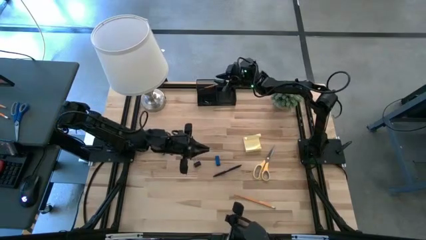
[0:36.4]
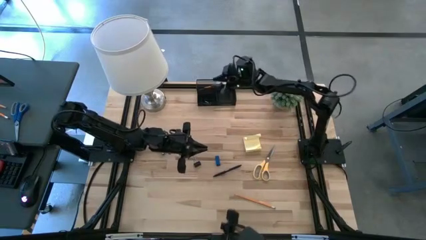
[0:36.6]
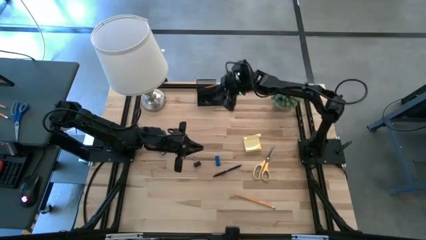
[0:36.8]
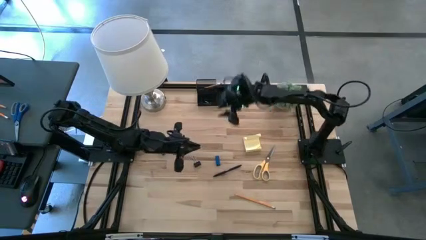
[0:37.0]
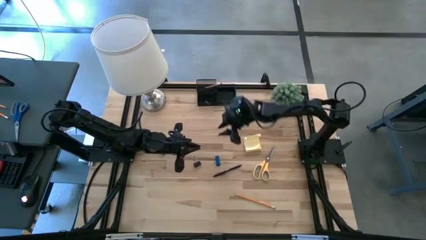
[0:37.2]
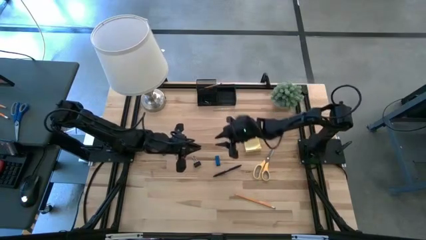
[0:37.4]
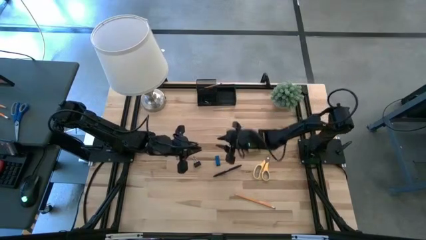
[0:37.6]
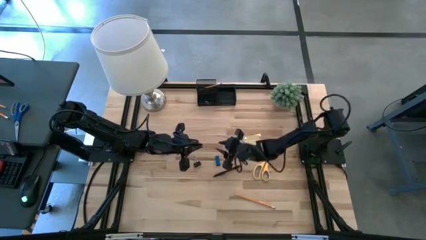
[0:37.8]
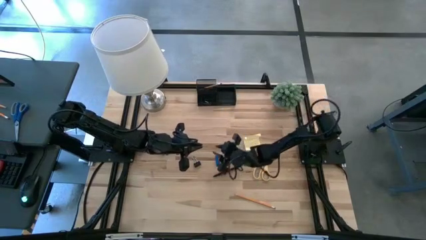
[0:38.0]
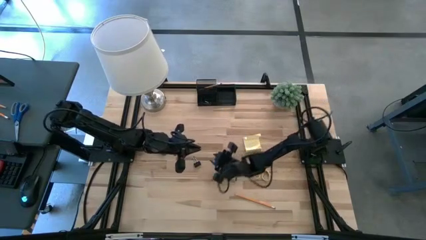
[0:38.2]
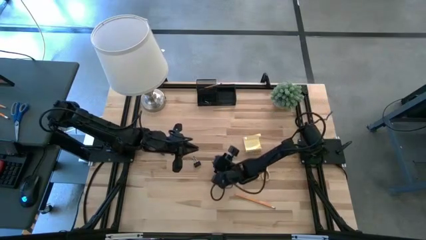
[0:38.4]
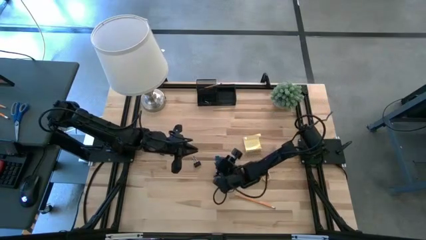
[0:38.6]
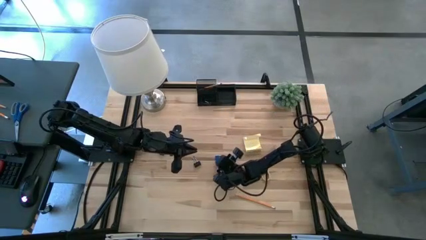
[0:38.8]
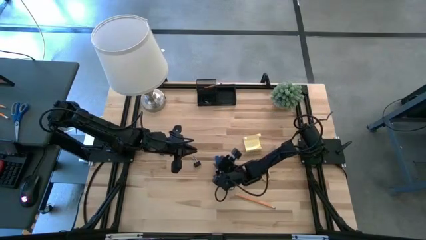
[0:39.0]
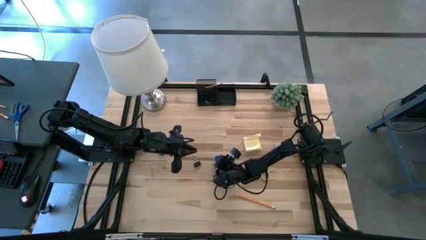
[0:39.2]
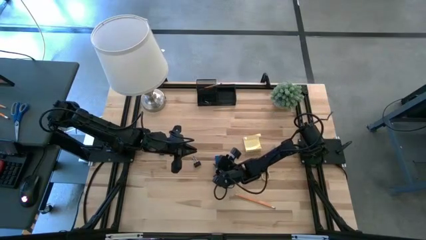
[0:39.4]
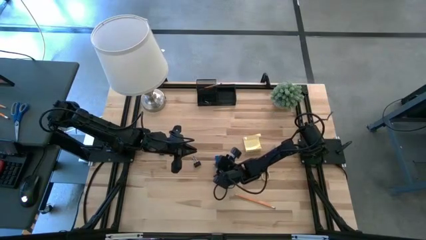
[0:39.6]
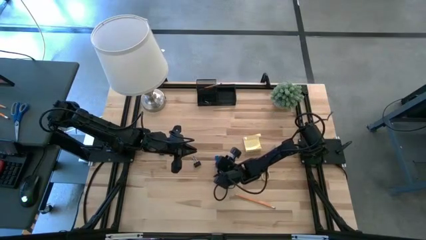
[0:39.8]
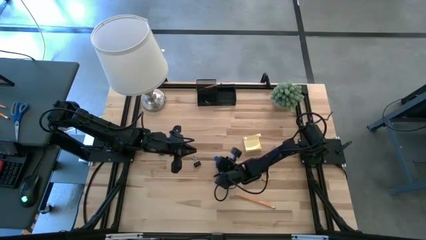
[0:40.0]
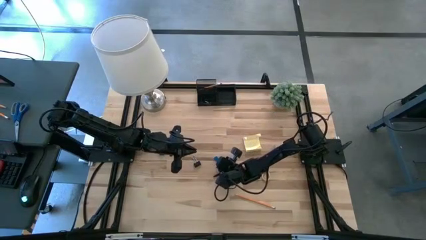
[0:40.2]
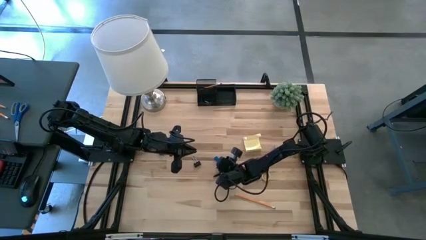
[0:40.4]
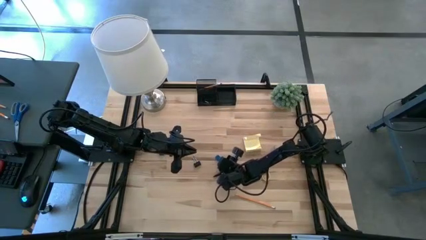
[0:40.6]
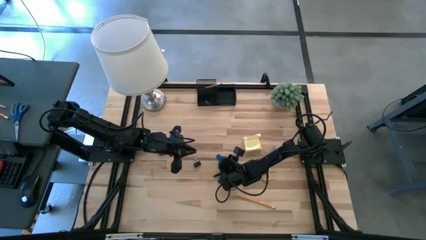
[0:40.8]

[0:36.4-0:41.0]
Task: Pick and place office supplies into organizer
Put the blue eraser into the black desk organizer

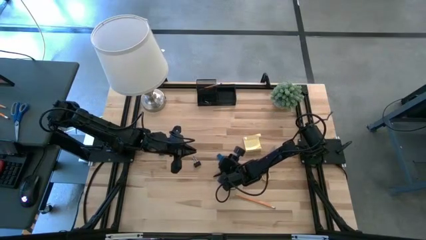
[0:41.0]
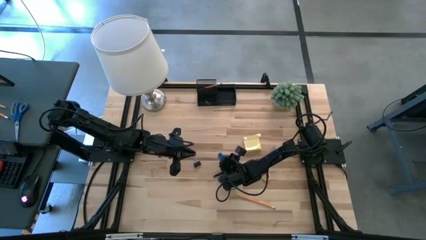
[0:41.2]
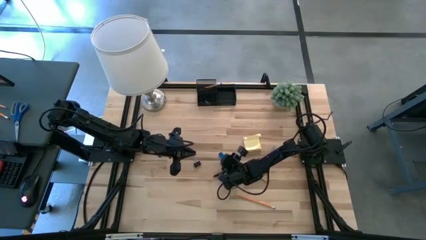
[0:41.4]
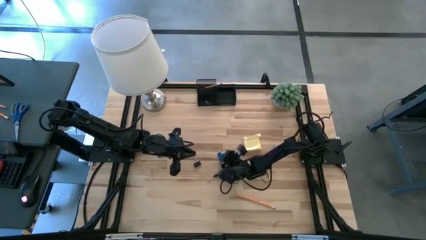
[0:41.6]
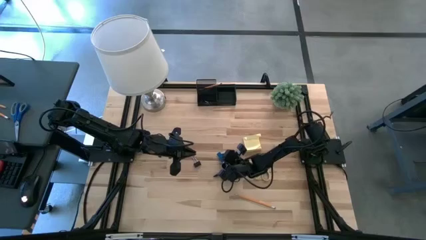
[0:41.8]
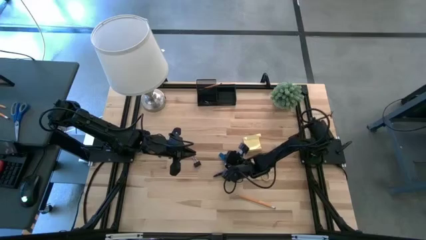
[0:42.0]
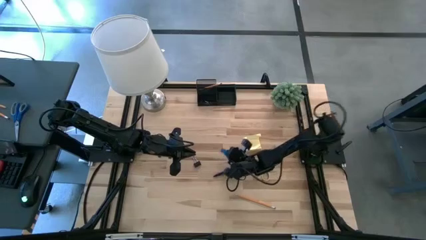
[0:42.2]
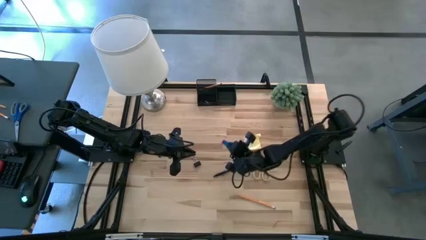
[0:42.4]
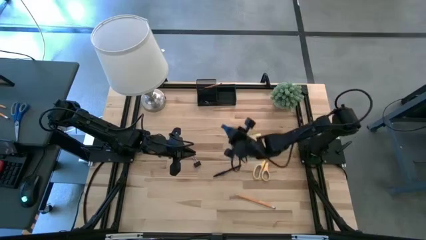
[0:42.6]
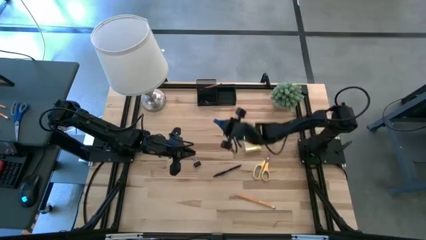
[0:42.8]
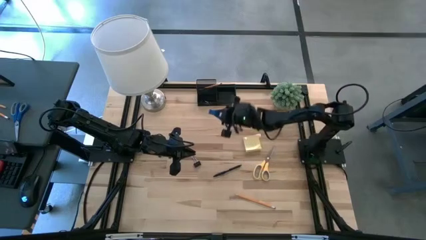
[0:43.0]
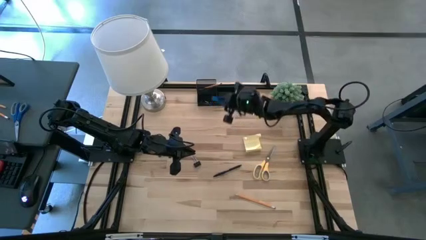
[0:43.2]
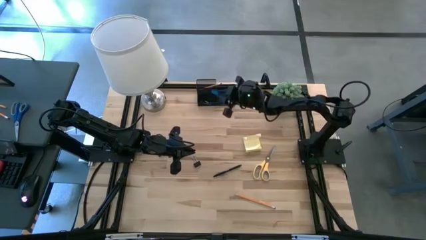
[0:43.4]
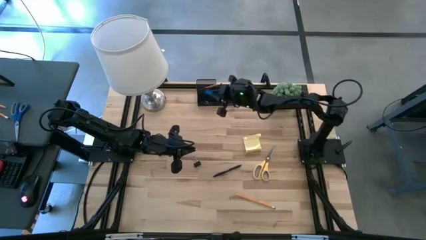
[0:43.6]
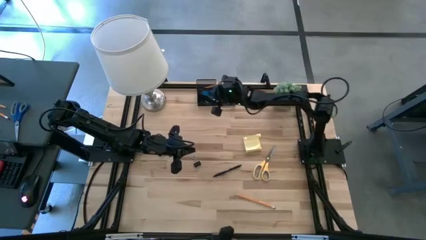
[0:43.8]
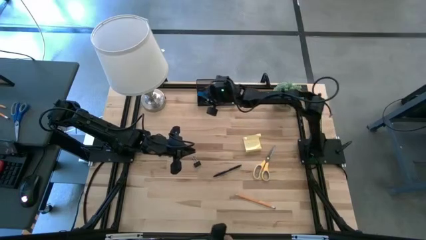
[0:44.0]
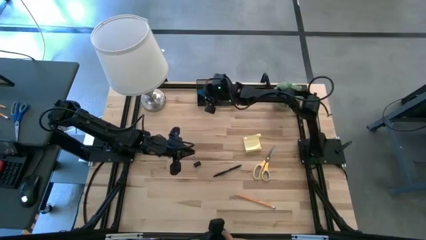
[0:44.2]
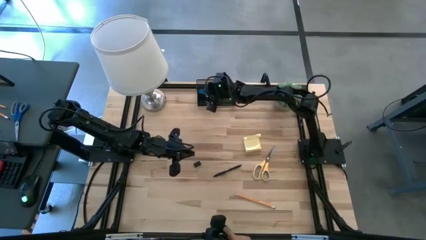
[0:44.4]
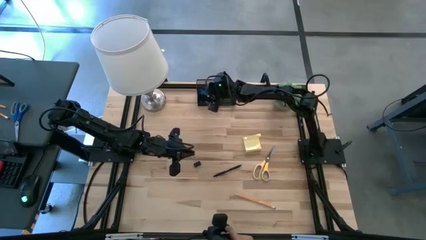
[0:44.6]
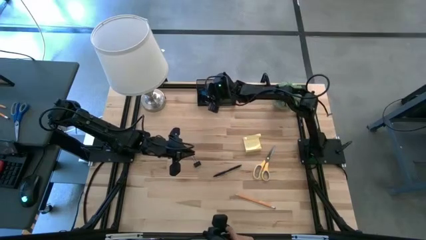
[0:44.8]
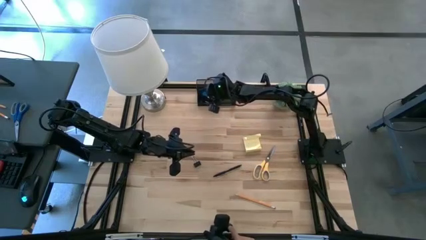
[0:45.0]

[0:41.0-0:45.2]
Put the blue eraser into the black desk organizer

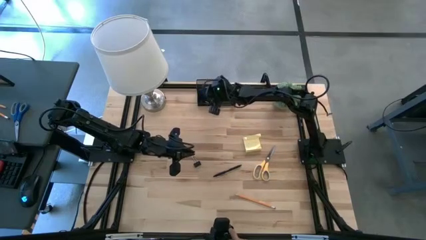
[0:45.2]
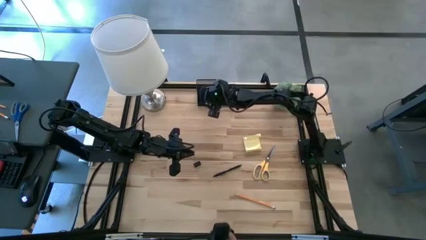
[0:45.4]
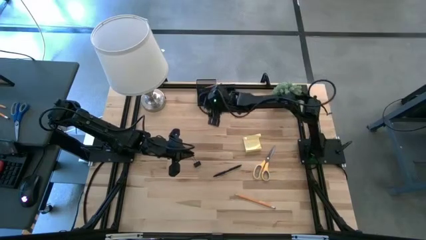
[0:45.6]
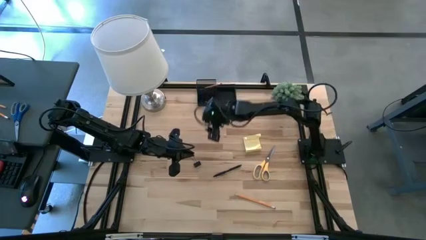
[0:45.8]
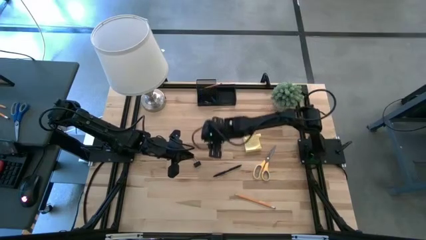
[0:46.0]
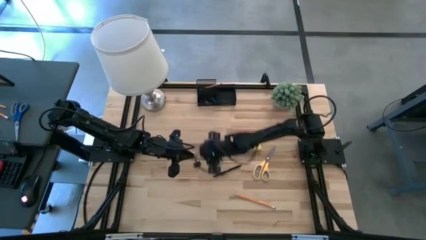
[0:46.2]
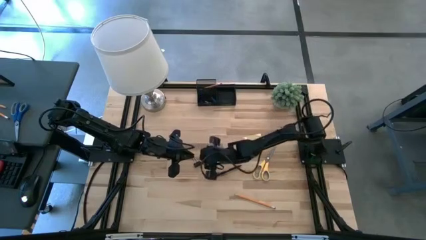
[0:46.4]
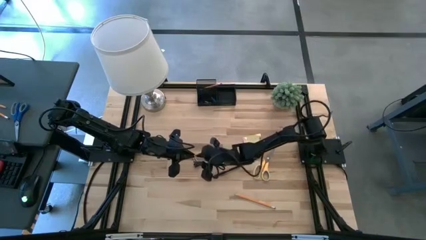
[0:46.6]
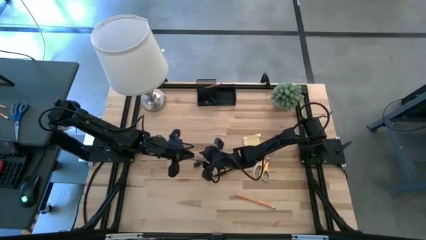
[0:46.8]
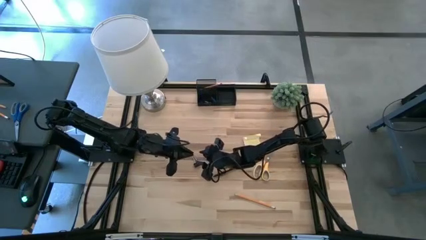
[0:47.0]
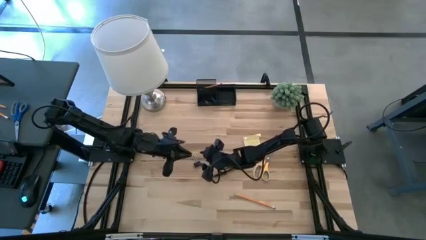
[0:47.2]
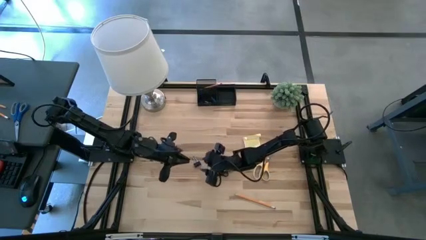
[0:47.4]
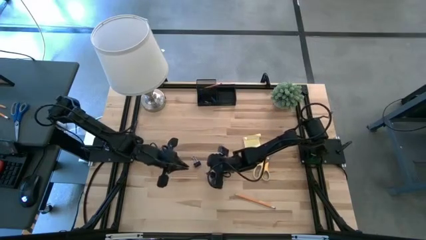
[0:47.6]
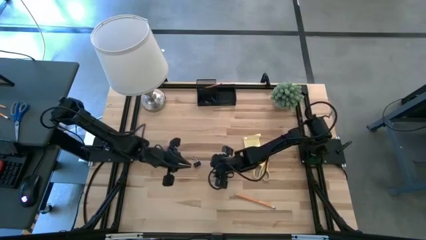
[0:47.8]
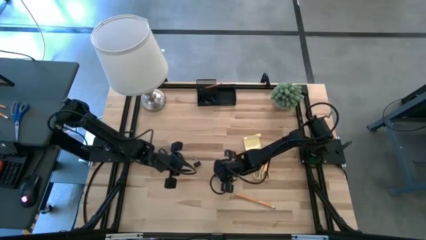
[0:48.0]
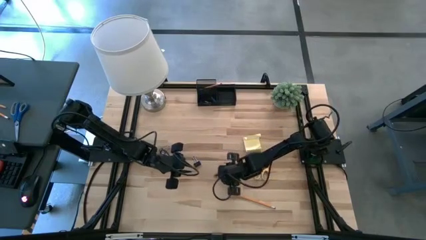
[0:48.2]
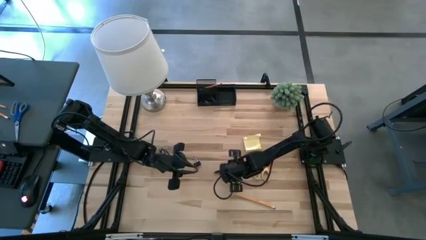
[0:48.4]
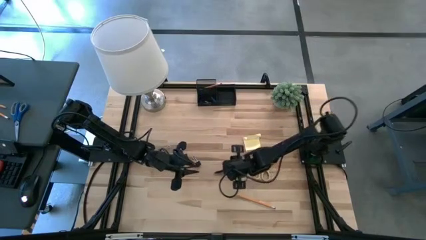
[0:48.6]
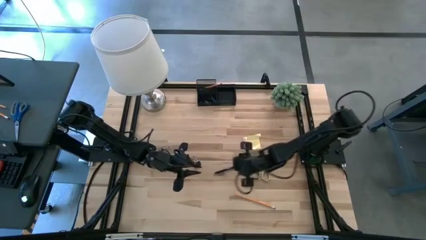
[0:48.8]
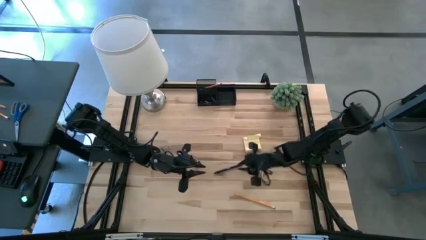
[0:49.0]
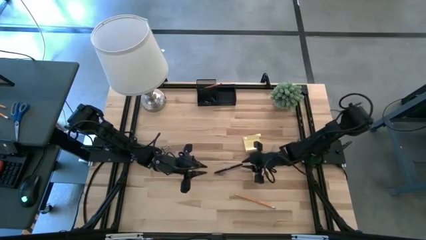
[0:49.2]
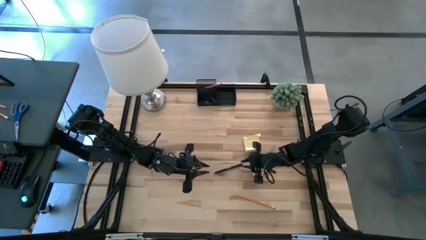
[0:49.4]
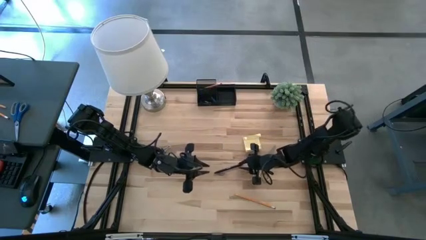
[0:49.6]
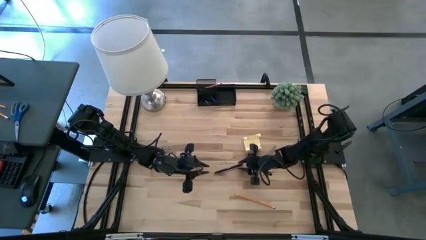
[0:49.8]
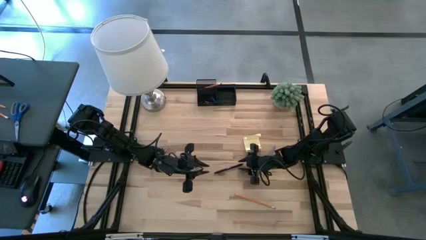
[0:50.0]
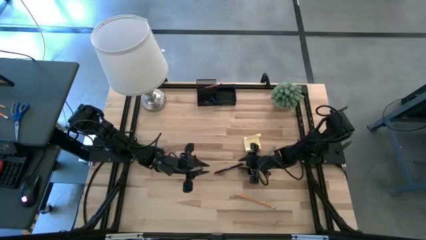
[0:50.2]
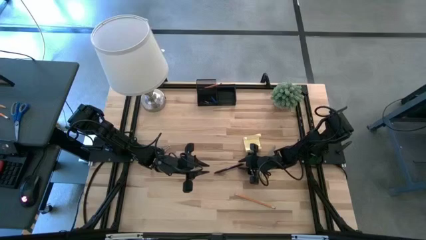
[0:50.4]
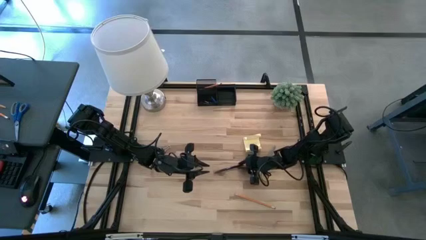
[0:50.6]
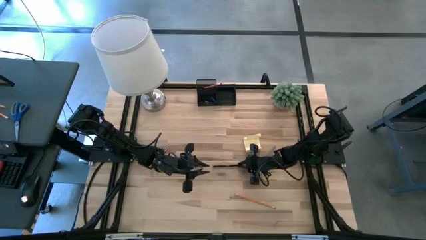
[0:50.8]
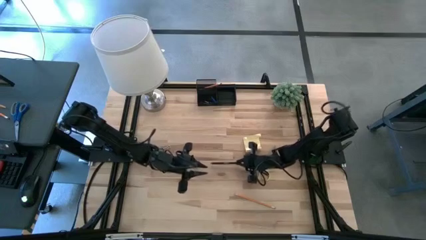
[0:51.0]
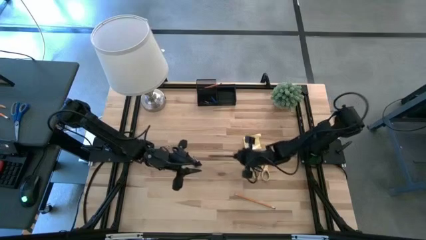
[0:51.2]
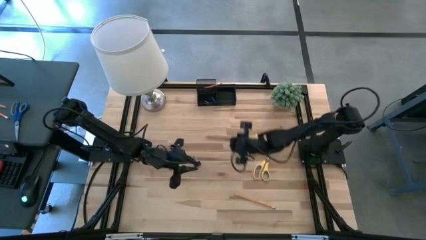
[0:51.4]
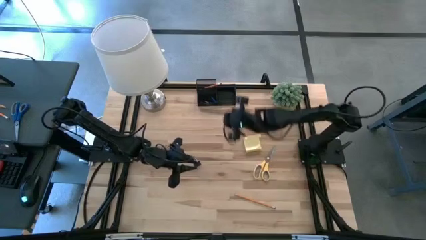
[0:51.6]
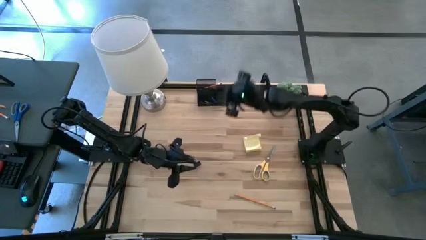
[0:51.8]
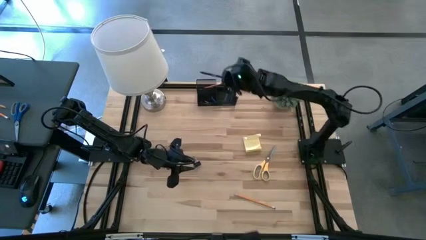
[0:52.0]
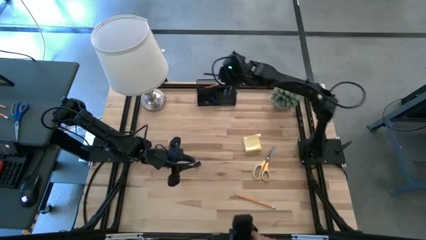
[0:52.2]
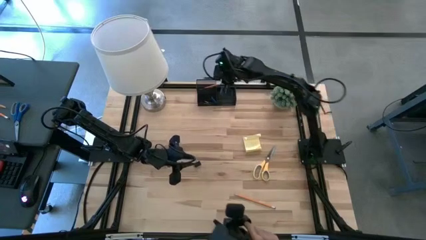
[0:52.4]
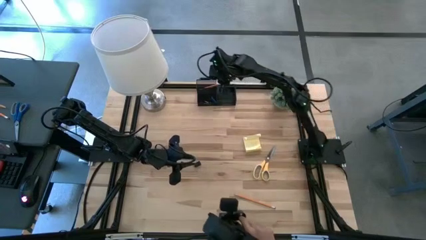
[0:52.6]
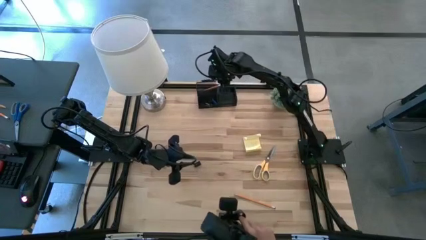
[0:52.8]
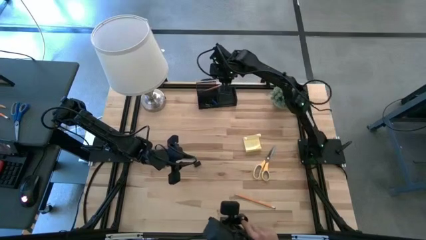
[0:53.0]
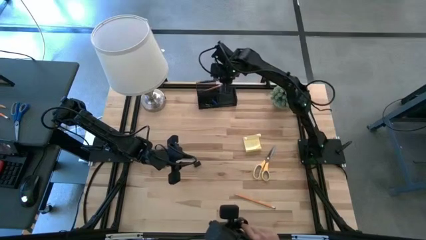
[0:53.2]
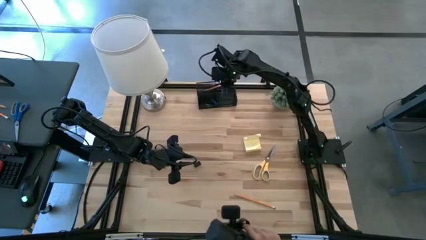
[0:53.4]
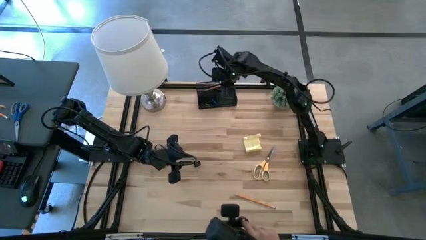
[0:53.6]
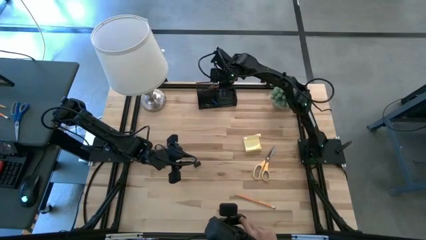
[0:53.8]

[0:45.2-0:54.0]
Put the black pen into the black desk organizer
